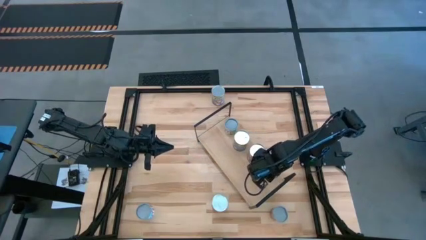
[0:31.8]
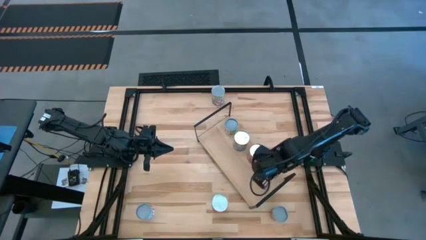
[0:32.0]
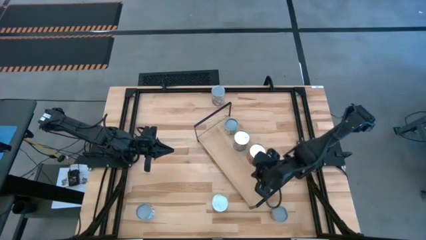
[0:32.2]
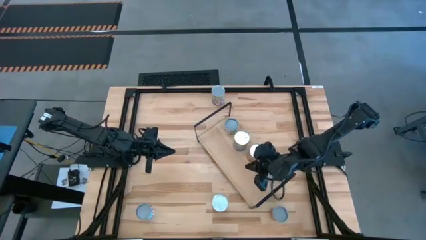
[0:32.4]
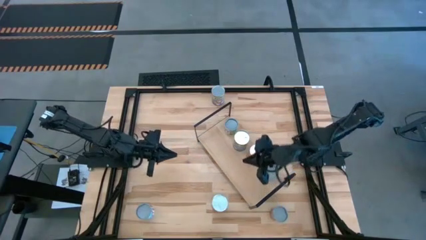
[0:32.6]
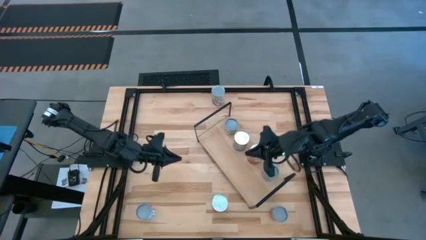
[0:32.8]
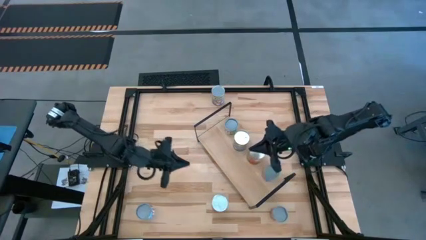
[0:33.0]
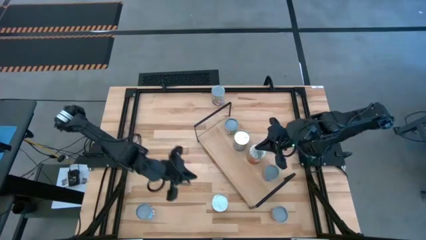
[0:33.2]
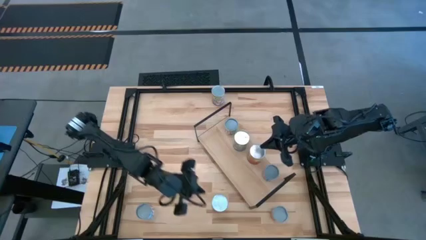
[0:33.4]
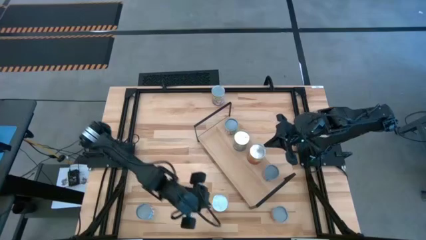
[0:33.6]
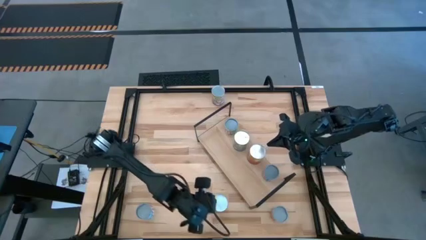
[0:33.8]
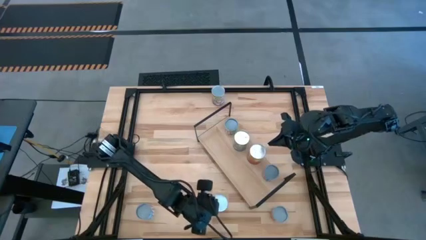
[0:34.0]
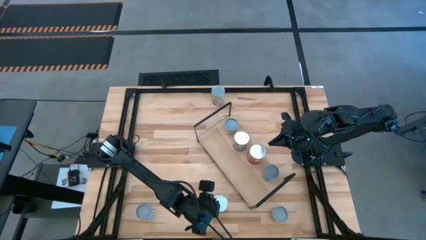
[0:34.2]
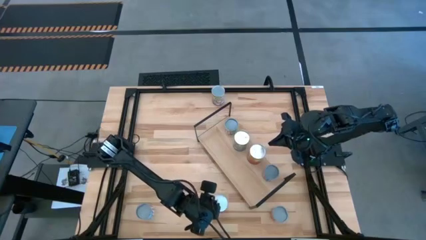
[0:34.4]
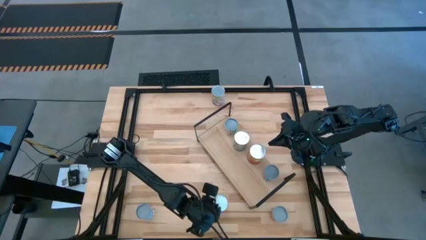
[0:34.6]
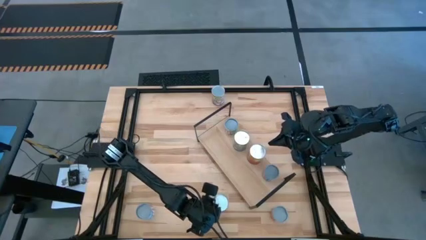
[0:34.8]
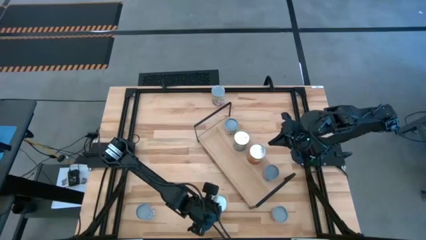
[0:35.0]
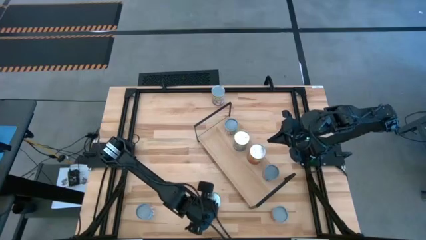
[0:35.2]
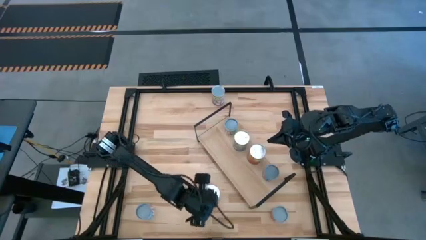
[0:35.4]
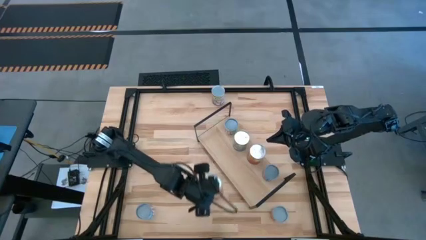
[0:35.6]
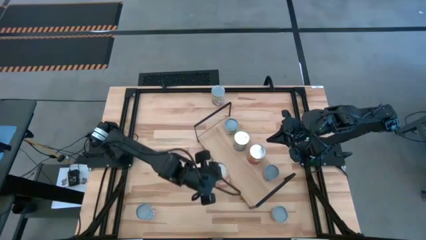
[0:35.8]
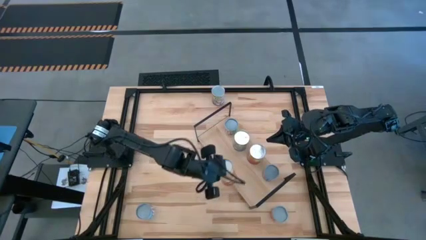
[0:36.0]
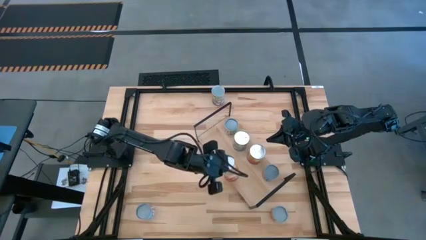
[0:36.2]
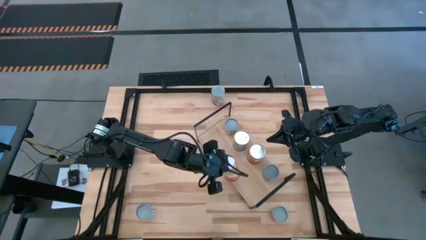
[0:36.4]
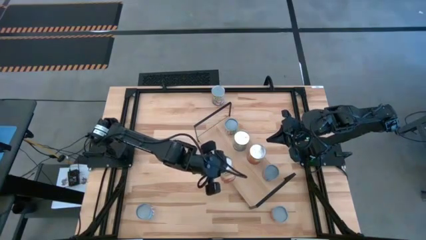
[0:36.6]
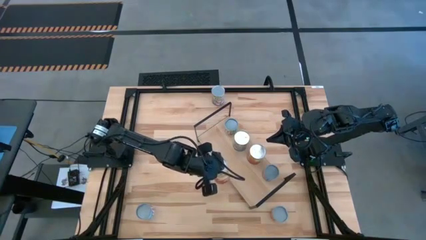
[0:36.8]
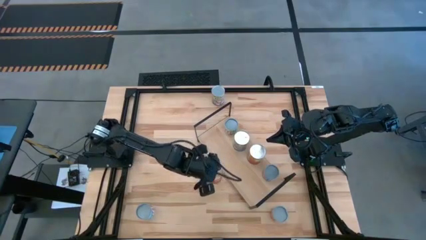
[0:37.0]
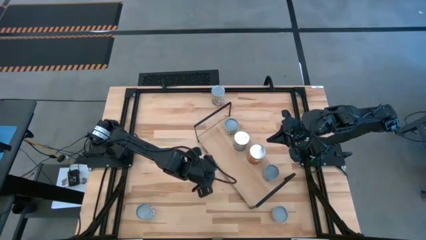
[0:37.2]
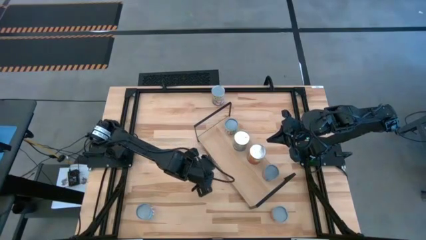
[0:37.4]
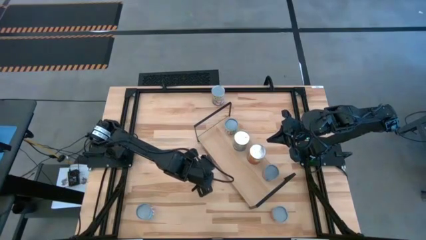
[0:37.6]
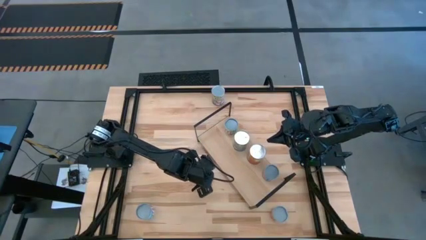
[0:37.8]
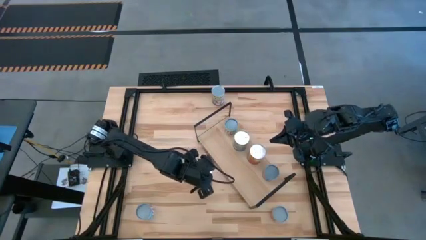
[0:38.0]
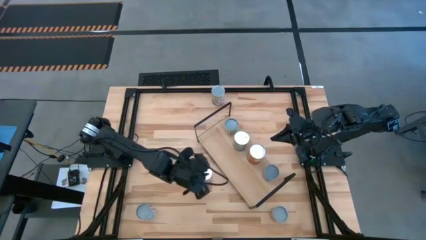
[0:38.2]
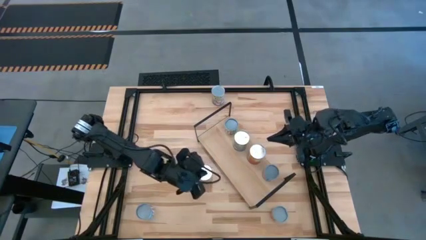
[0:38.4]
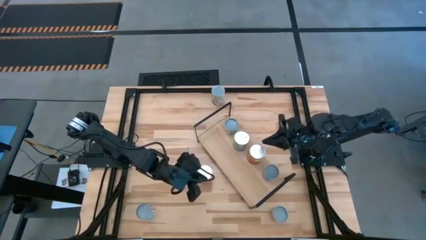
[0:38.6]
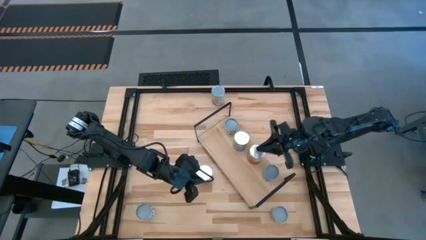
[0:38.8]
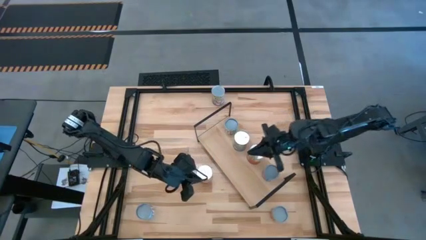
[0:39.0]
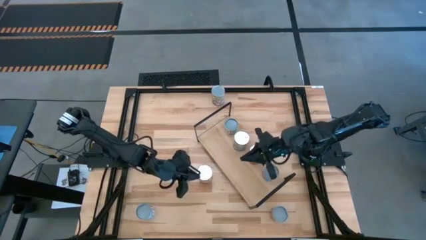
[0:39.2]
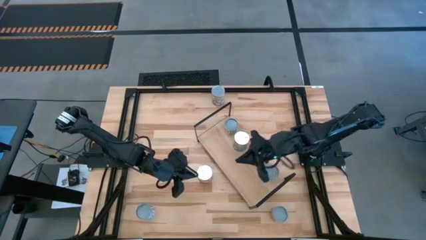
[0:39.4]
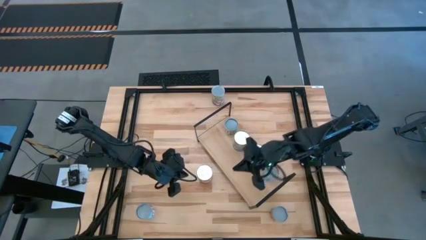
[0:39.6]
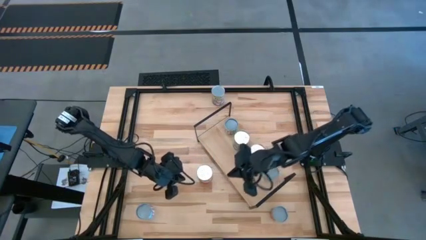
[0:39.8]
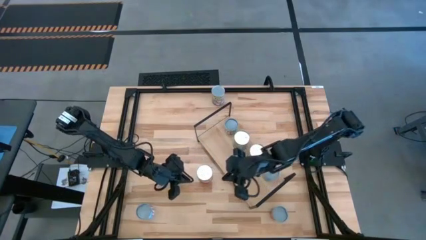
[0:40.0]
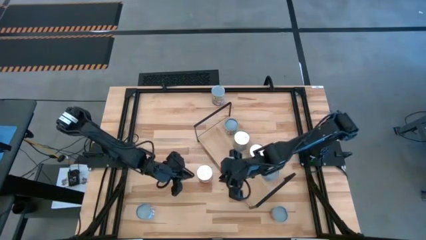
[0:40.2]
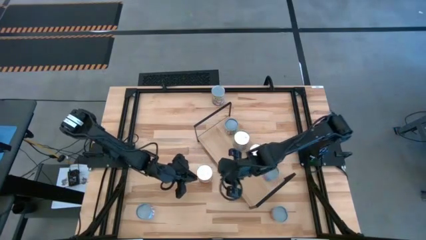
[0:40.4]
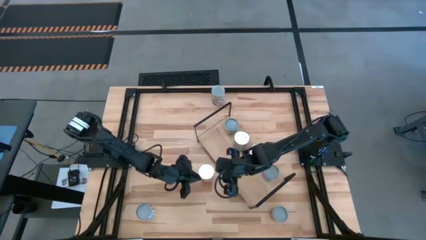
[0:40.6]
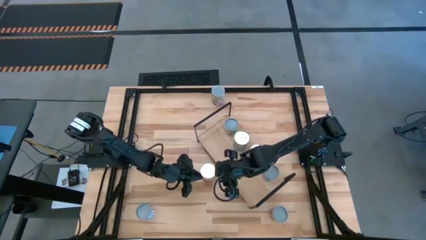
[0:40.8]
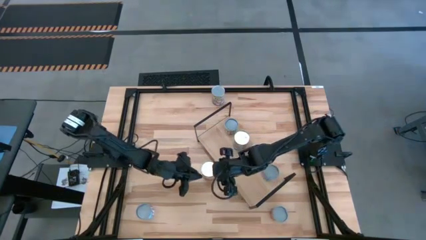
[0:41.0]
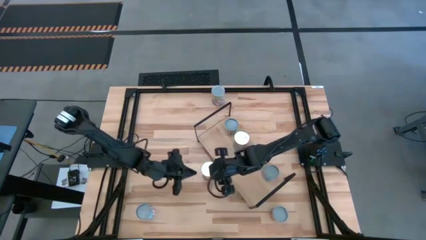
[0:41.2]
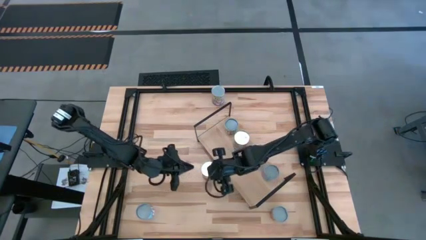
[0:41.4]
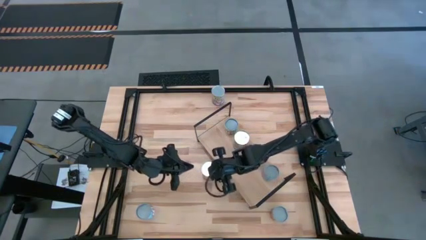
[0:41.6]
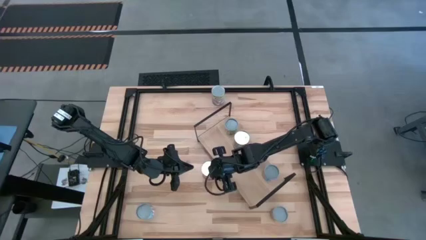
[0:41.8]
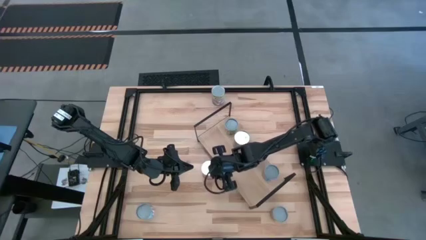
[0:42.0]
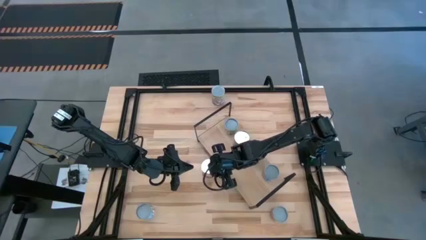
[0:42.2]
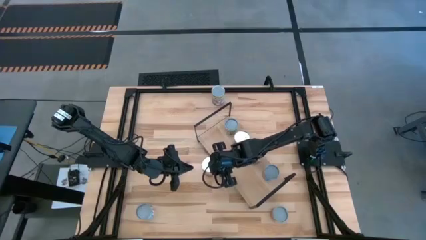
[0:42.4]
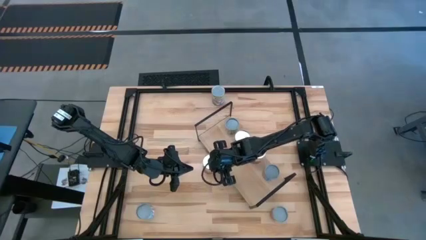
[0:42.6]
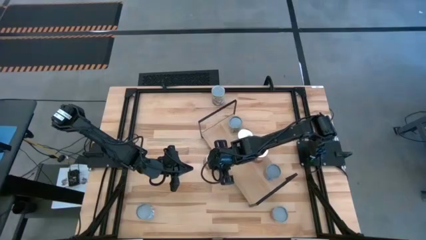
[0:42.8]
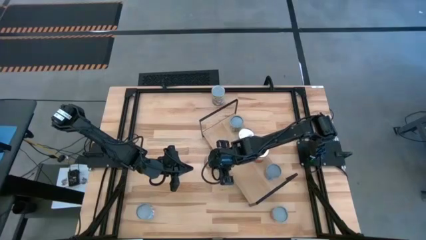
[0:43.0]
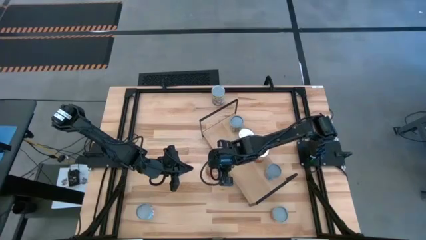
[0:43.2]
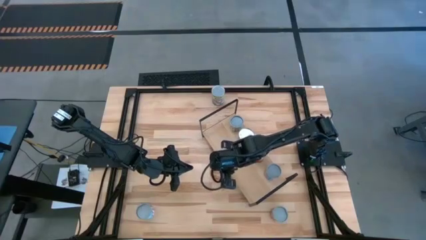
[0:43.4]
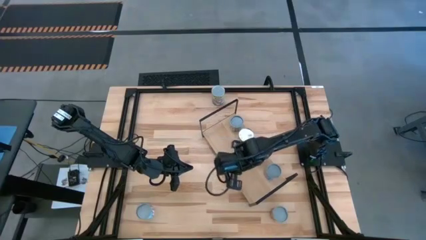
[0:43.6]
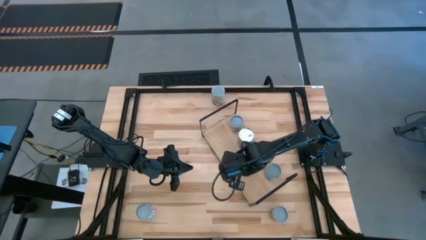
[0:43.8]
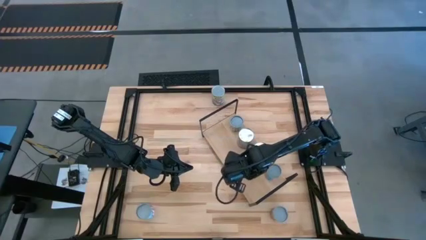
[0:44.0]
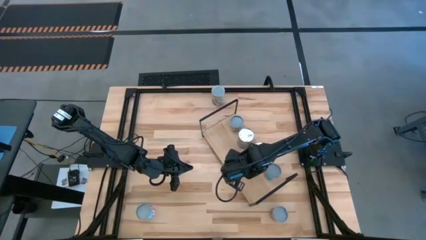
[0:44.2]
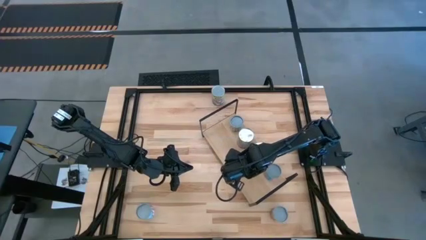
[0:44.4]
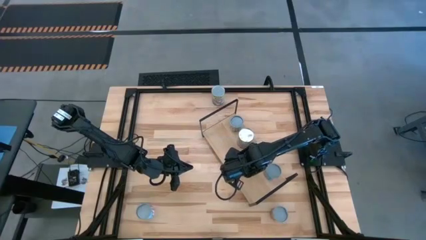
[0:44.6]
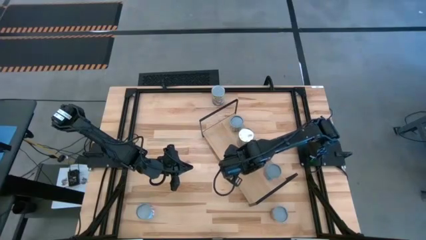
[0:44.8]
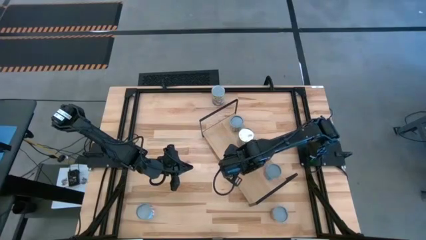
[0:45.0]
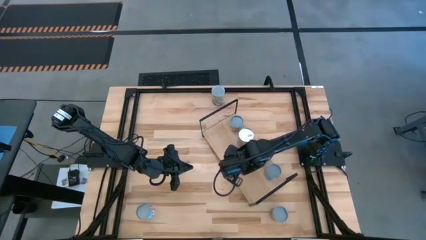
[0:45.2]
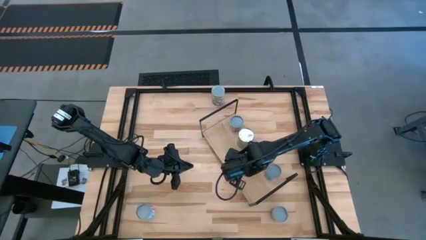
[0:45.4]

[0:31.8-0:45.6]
Task: Pick and place cans onto a shelf
Put the canned corn on the shelf
